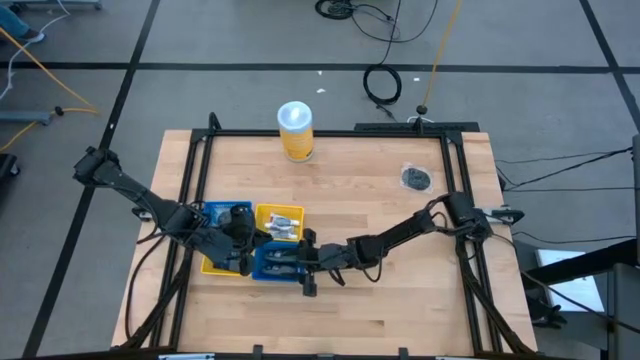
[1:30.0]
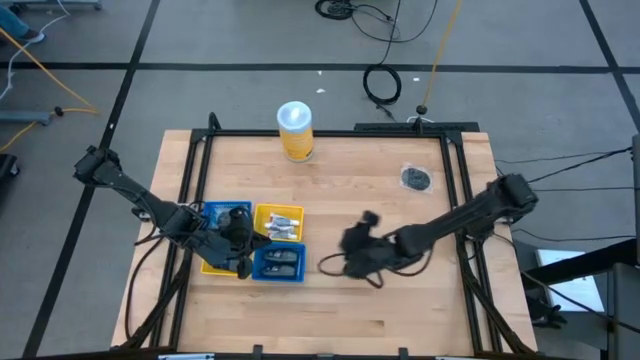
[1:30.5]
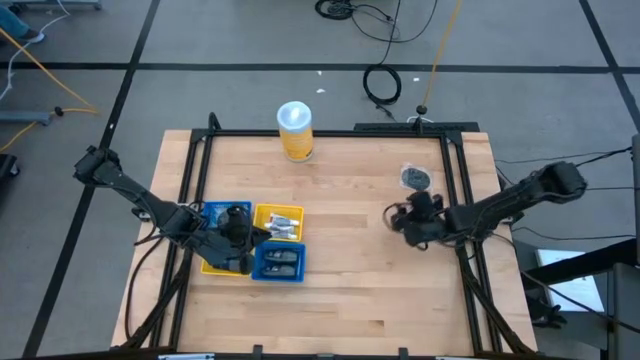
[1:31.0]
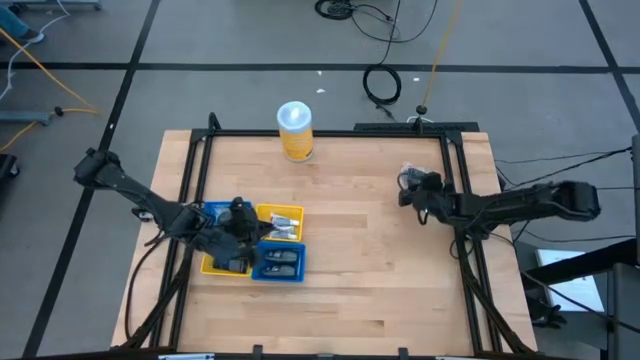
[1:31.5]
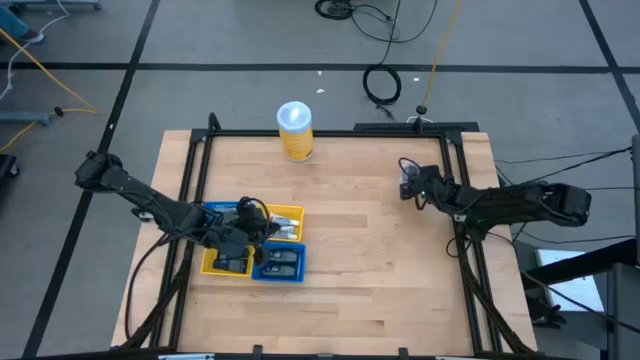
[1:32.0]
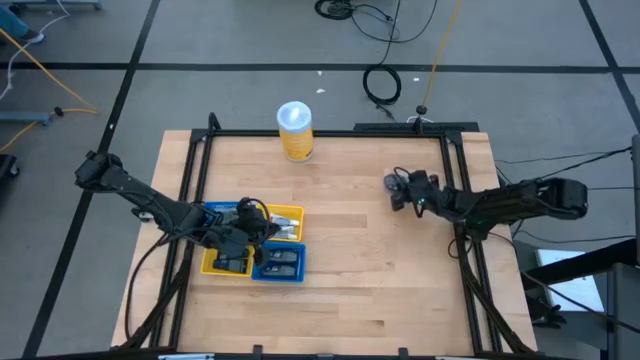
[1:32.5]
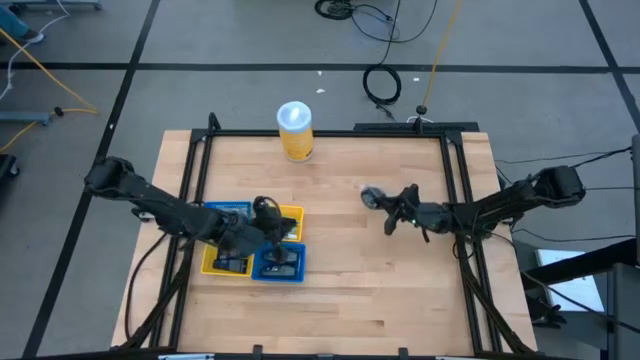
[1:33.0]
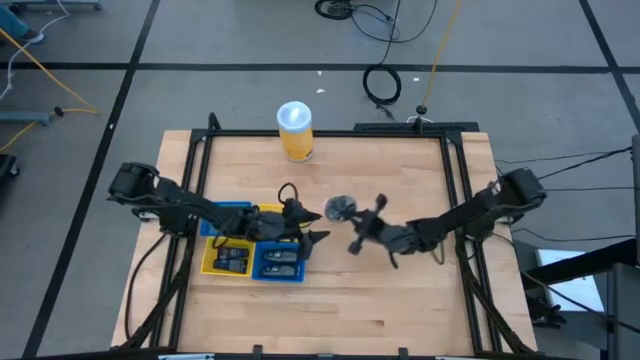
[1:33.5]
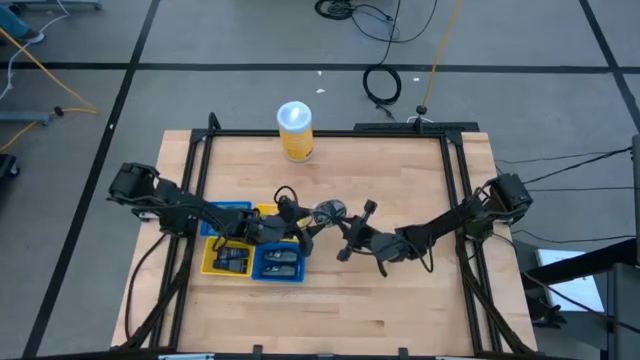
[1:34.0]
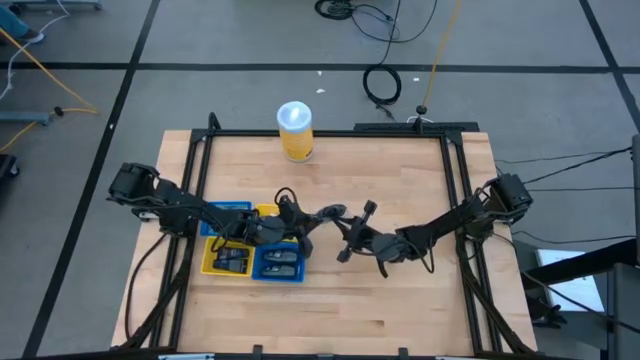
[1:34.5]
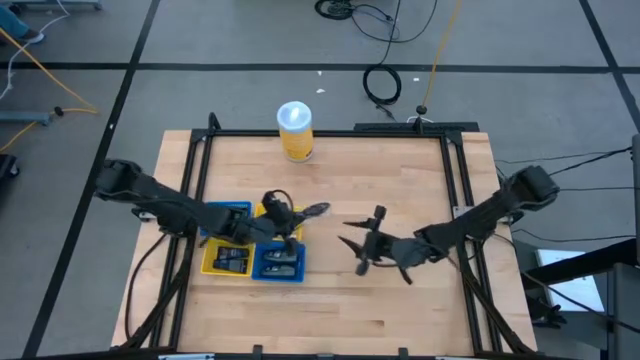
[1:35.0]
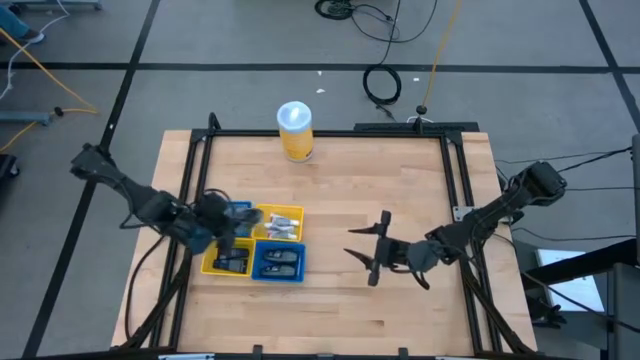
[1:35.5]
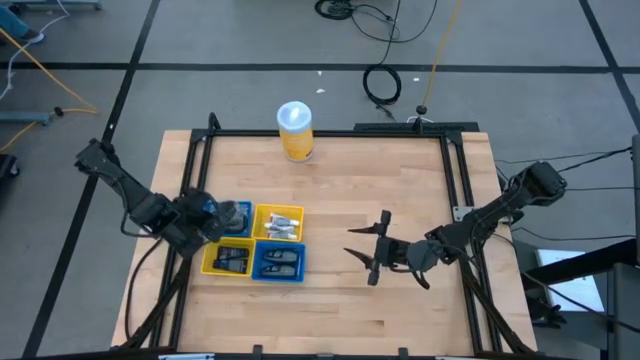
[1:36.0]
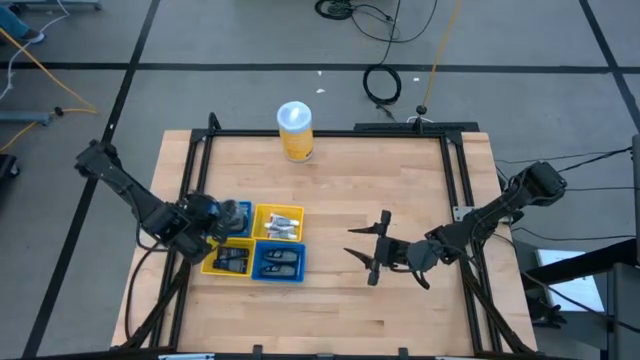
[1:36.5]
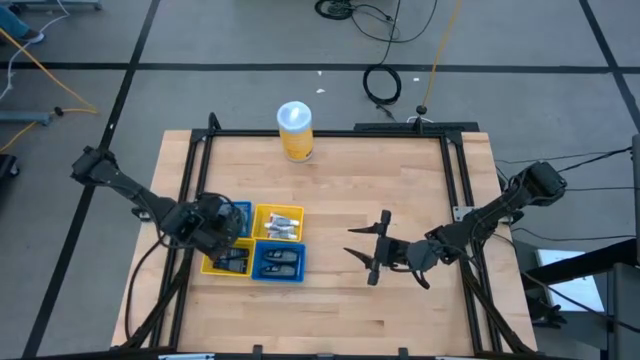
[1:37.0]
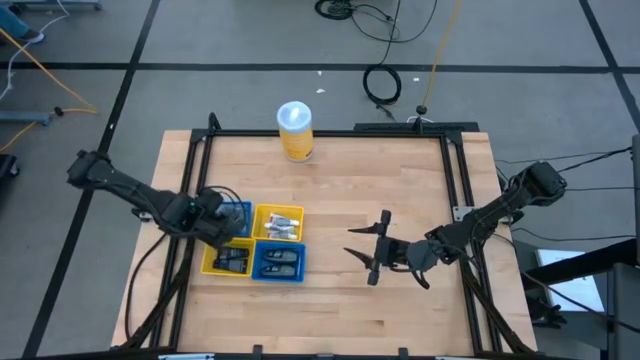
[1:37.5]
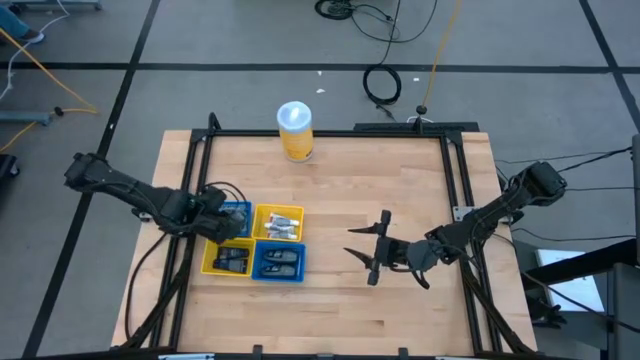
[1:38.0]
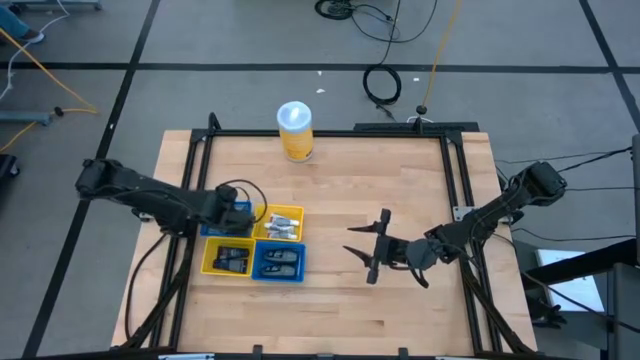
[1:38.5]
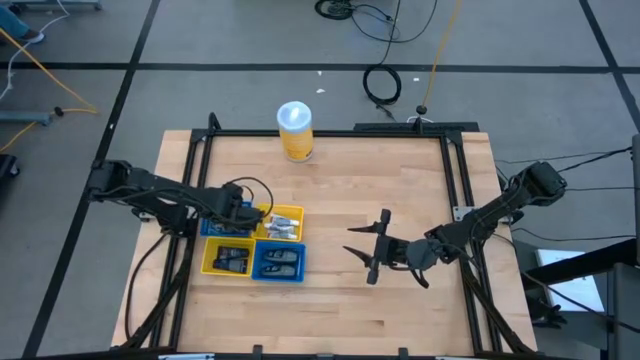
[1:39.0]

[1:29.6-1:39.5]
Task: Pick & Place Travel size toiletries
Put the black hairbrush into the top blue bin

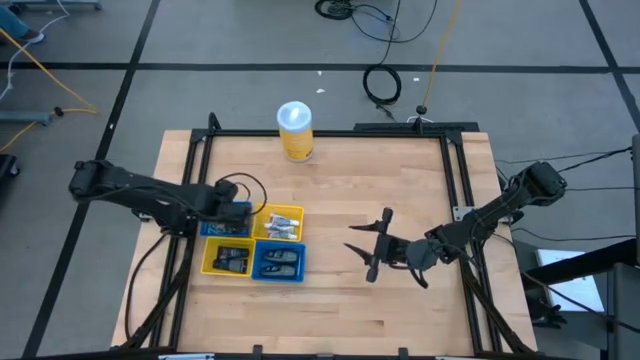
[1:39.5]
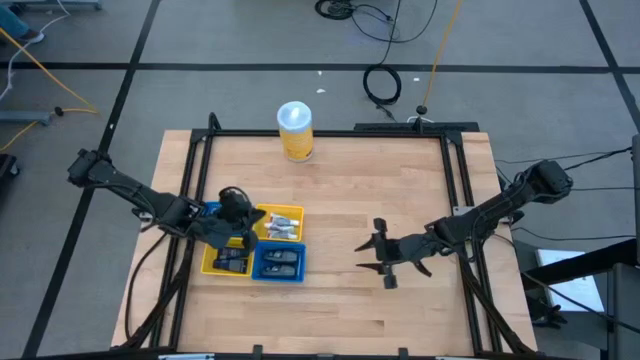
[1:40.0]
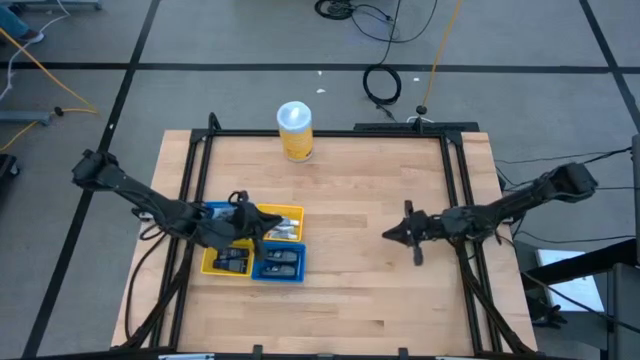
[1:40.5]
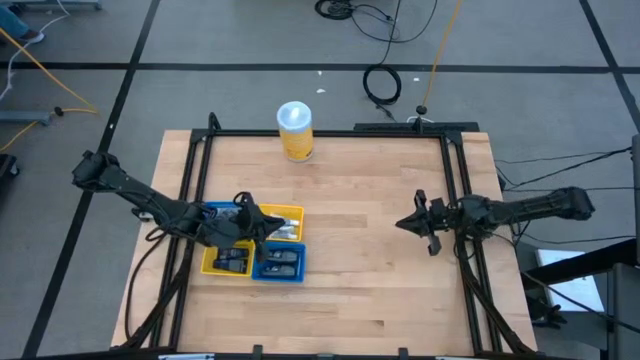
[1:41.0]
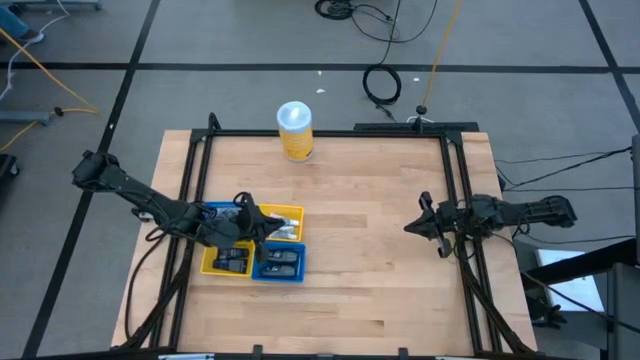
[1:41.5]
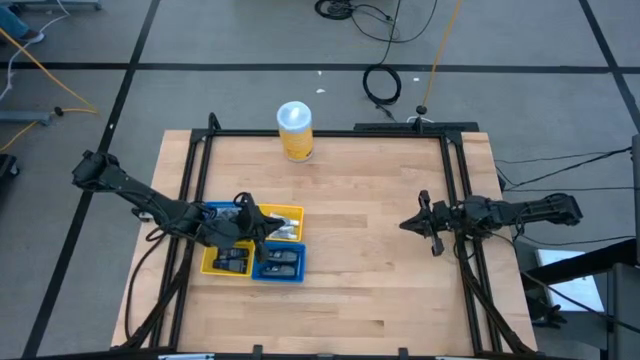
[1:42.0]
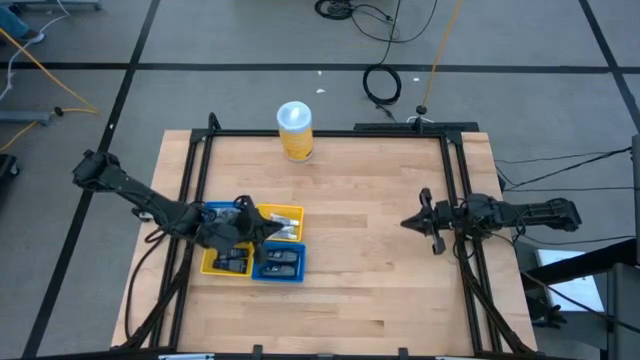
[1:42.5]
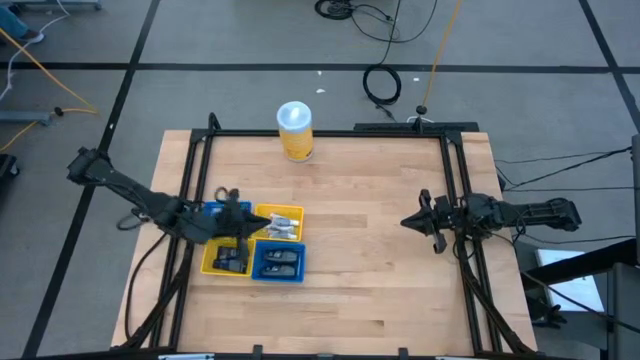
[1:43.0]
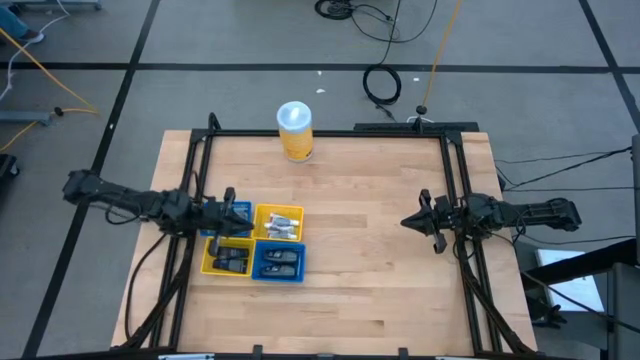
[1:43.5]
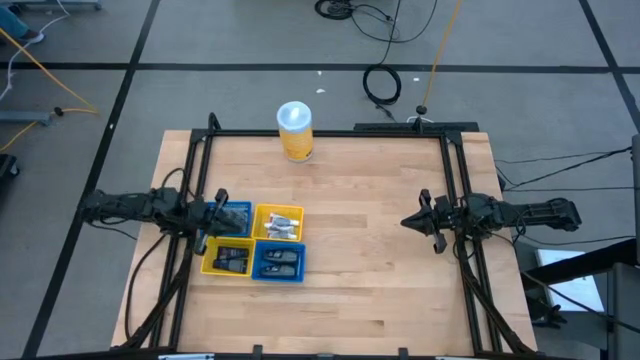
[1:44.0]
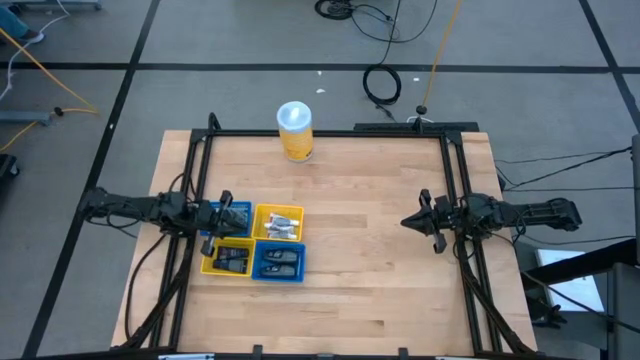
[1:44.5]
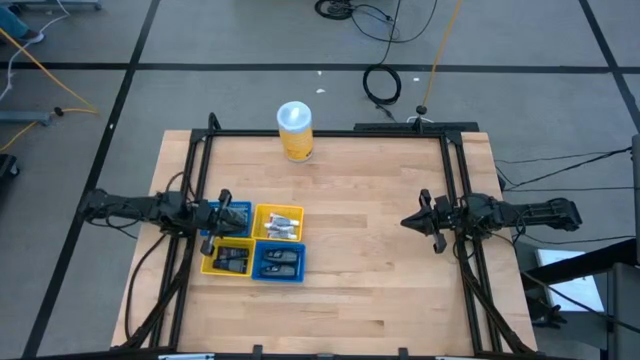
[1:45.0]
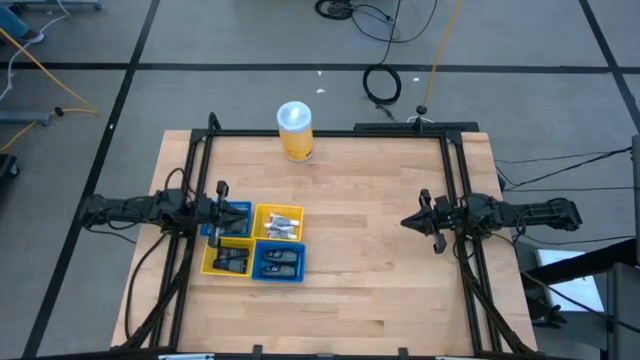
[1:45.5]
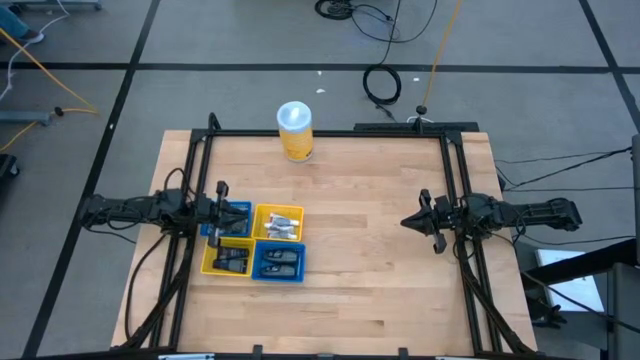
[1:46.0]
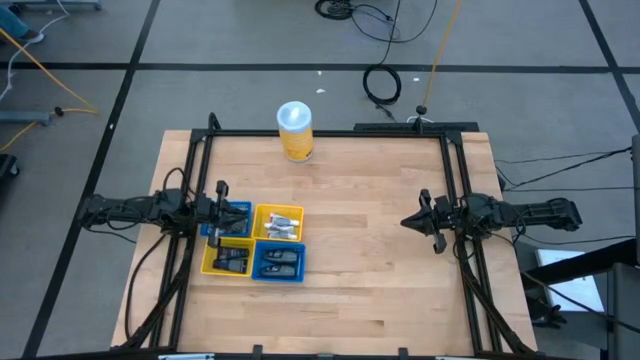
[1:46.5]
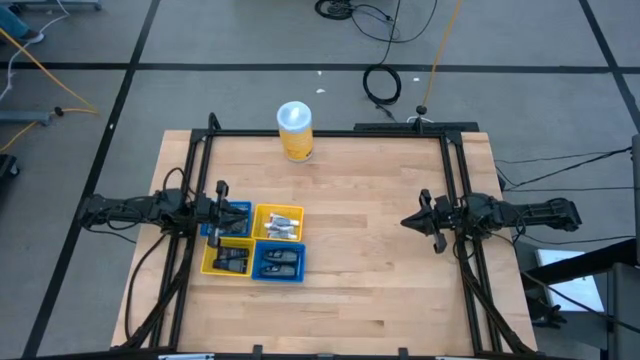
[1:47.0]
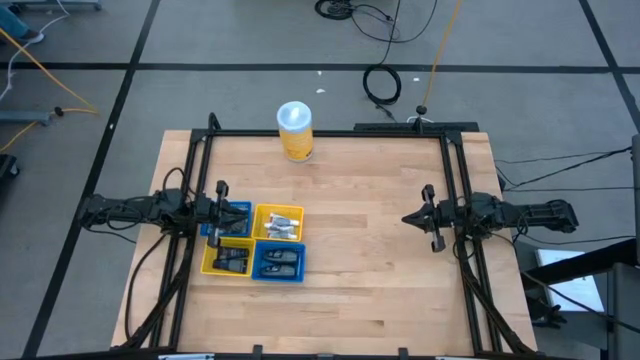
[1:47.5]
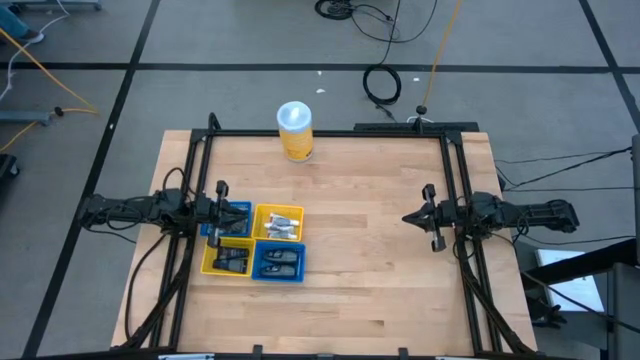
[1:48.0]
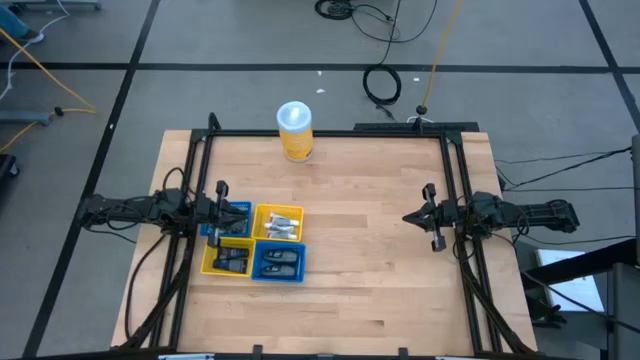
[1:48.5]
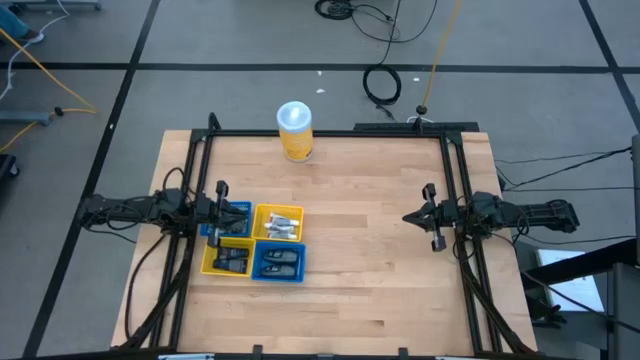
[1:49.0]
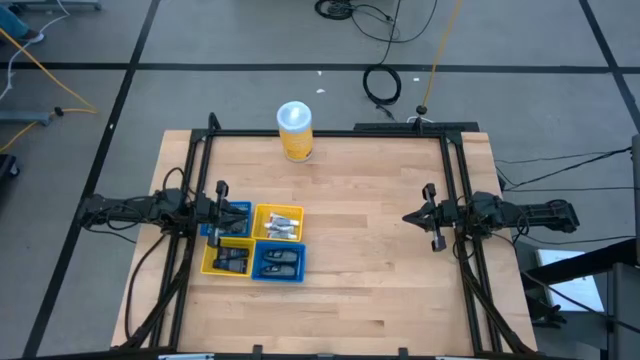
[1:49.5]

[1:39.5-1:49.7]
Return to Home Position
